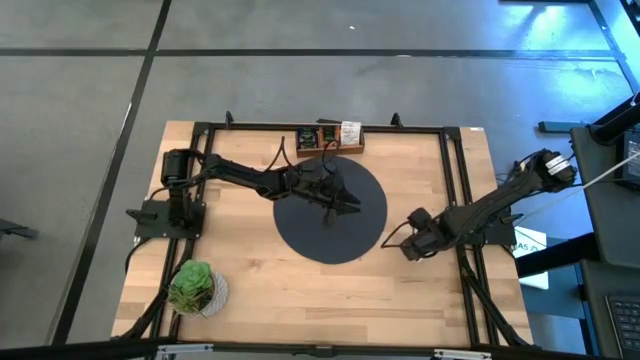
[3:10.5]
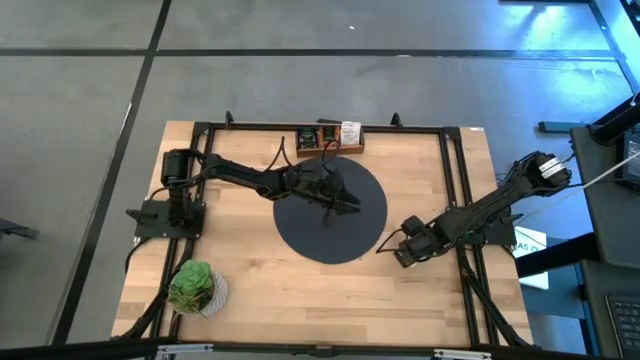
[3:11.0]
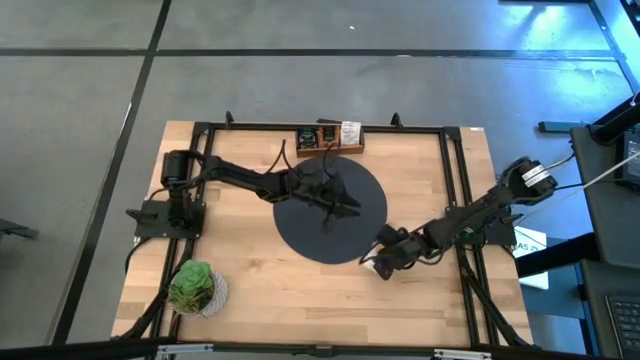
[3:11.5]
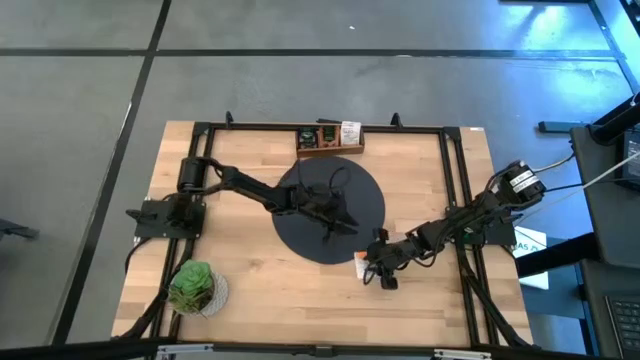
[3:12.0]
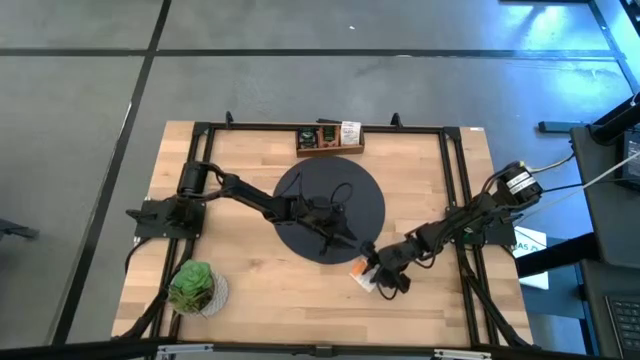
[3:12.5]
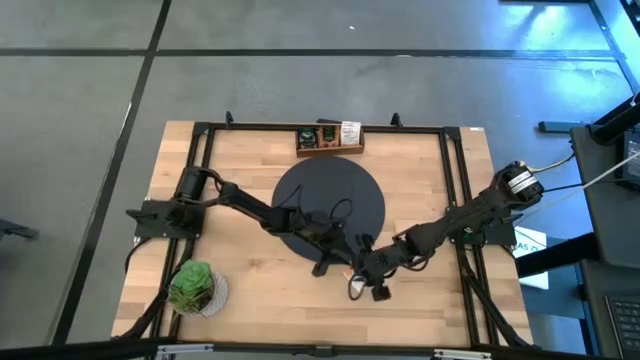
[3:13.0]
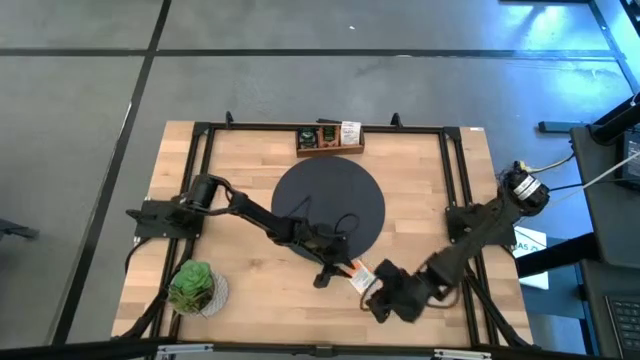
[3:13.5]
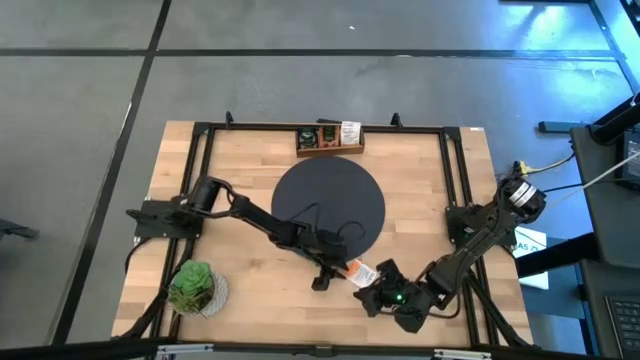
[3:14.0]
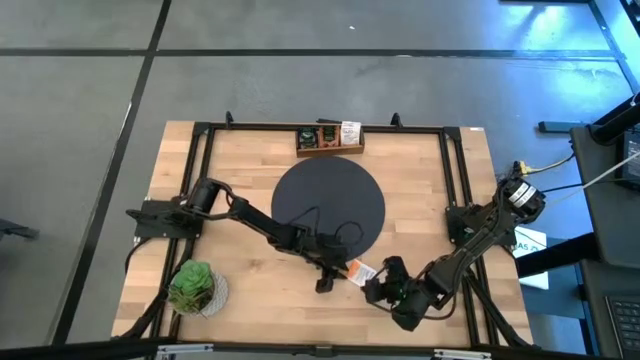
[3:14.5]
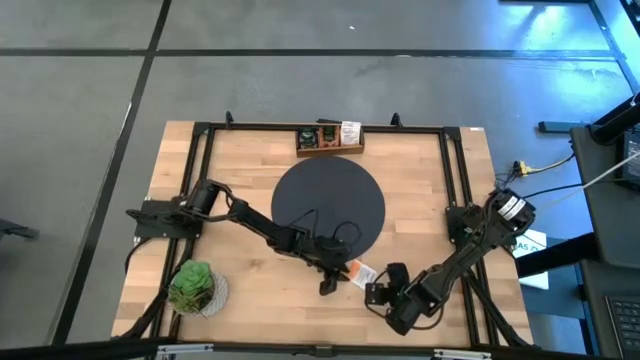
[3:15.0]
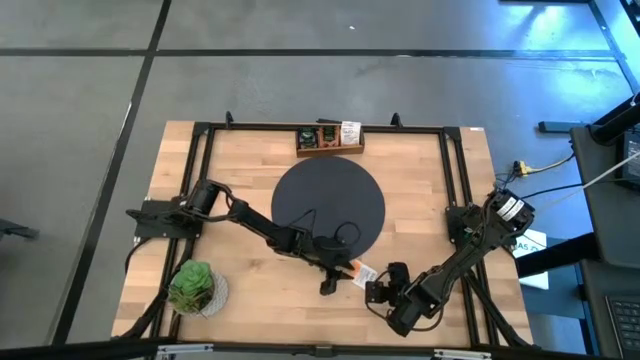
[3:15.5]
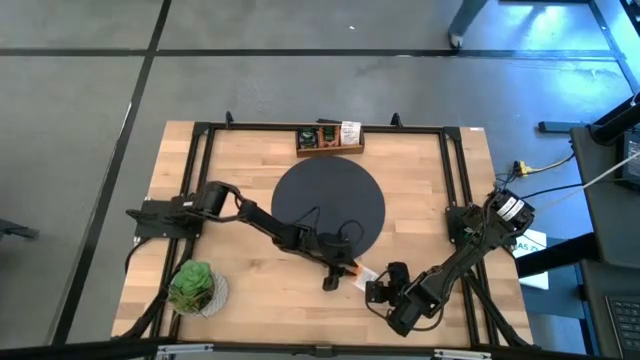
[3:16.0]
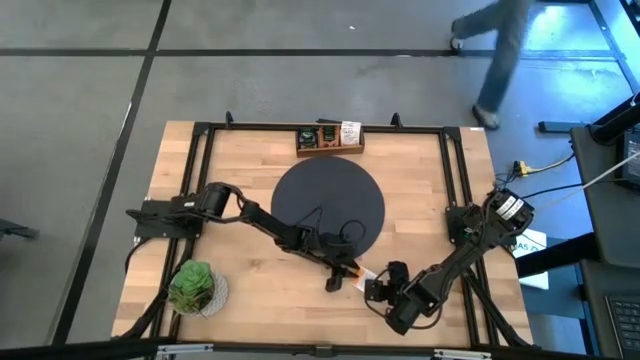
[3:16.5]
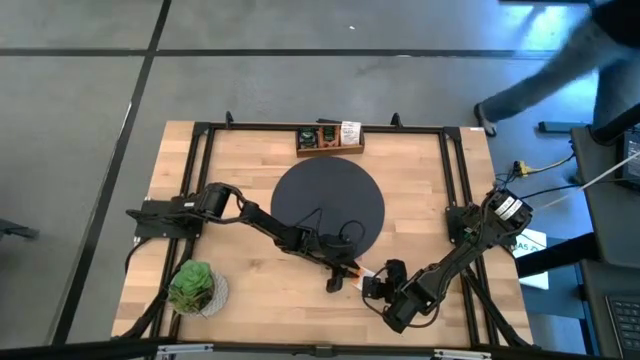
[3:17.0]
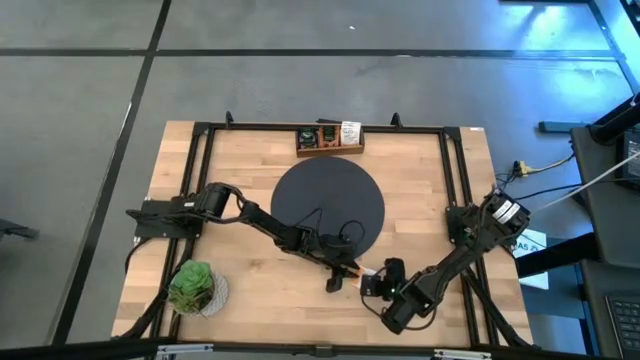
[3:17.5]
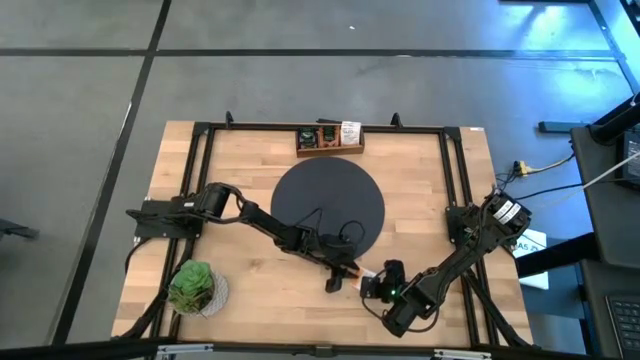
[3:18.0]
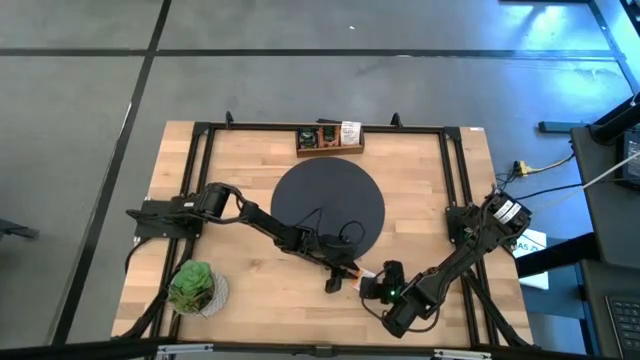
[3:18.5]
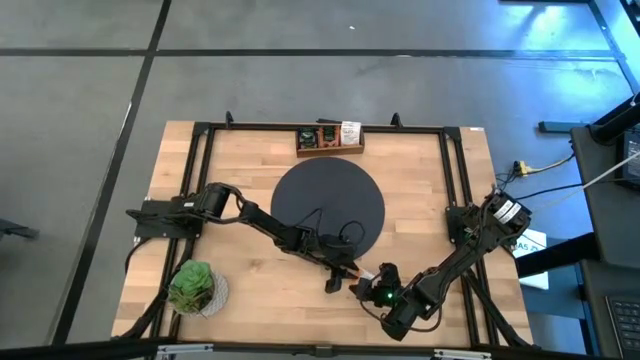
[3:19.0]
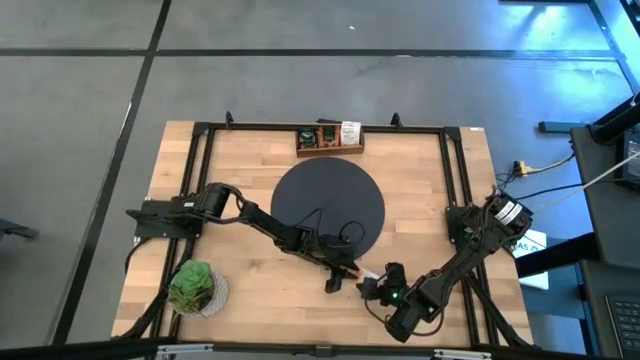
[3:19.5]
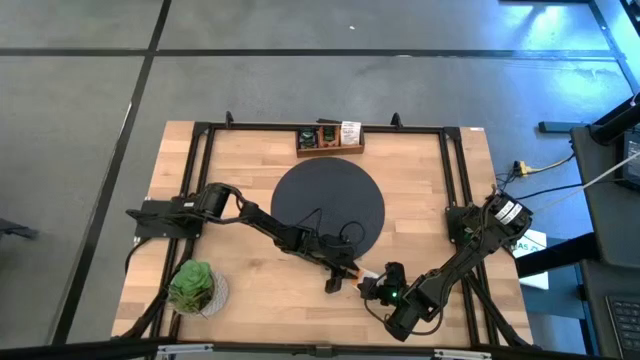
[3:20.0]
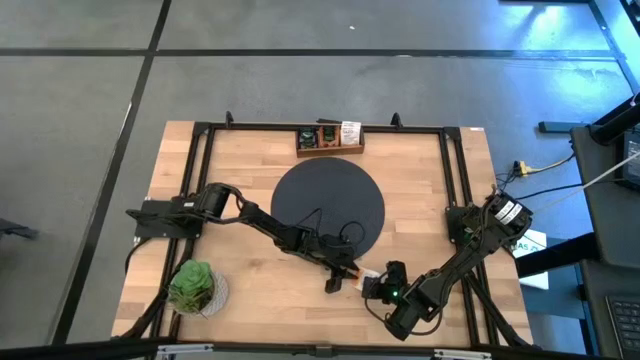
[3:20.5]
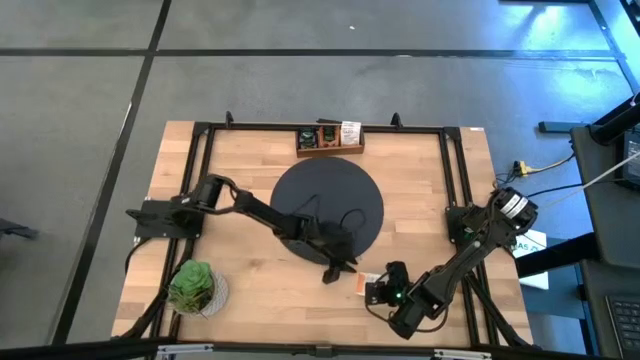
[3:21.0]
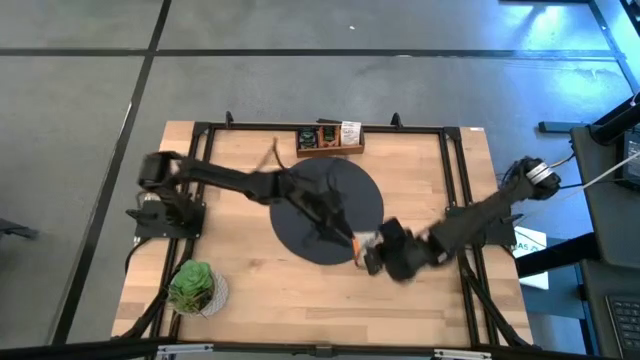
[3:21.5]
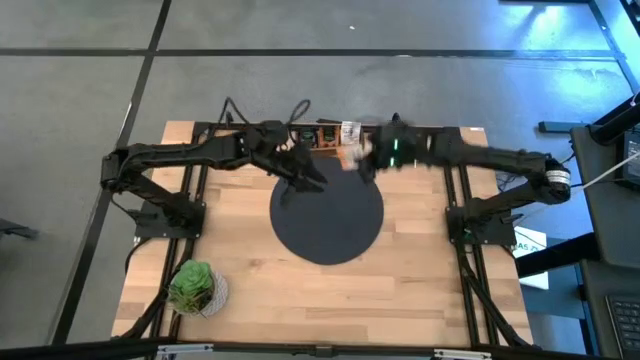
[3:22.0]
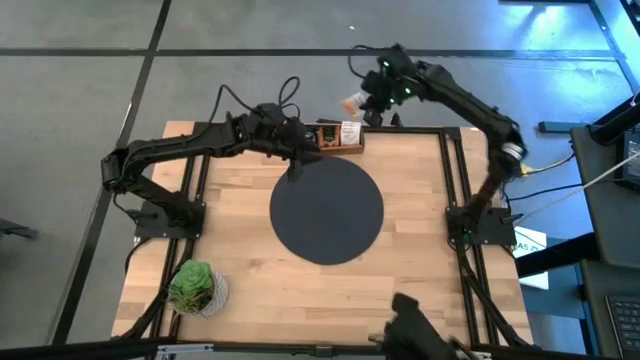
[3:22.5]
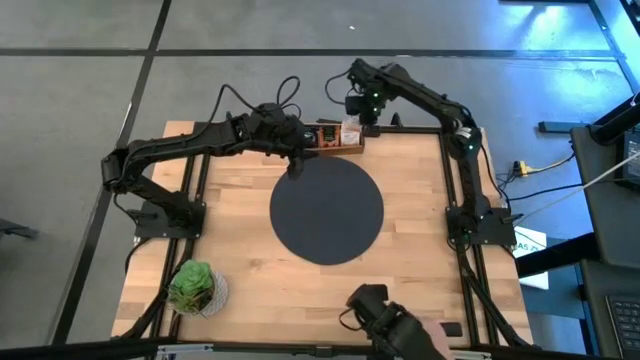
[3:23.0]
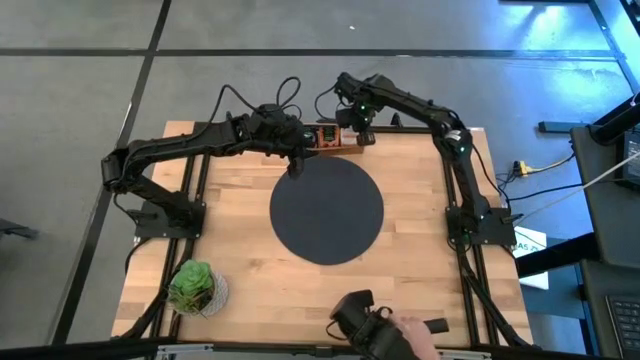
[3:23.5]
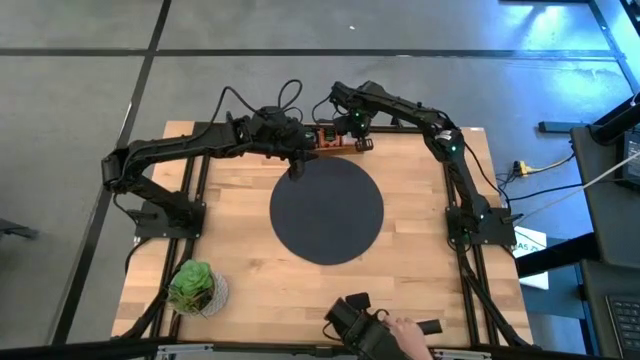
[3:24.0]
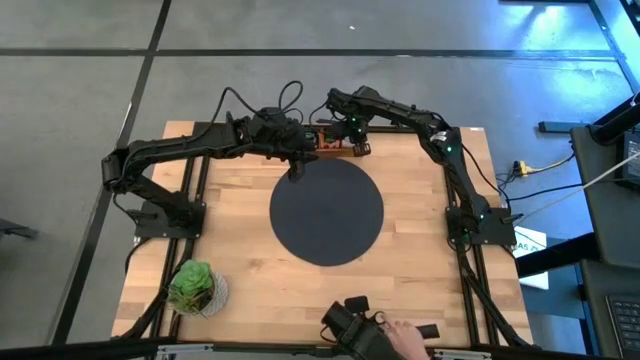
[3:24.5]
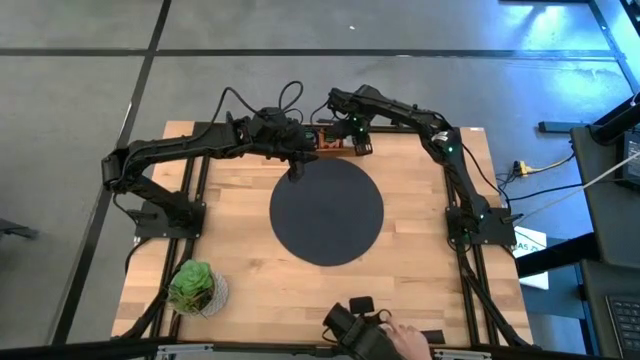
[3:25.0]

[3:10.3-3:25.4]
Task: Pick & Place Tea
Put the white tea bag into the right section of the wooden organizer

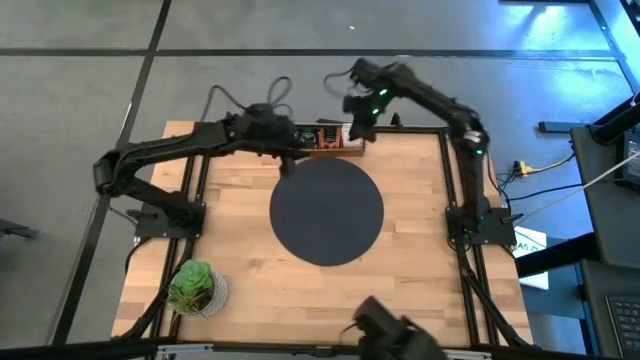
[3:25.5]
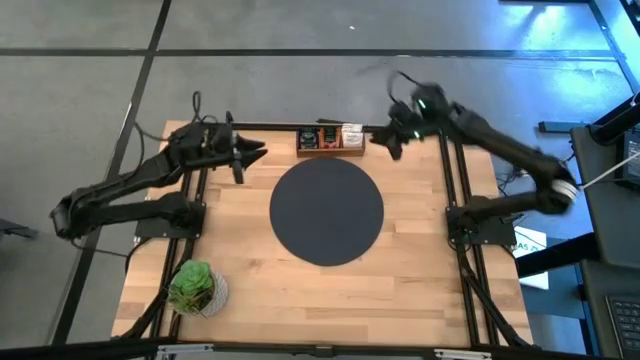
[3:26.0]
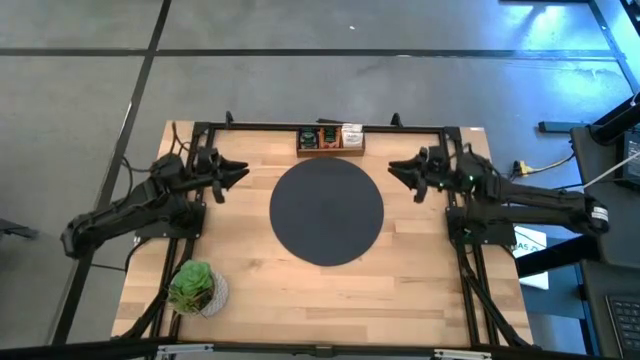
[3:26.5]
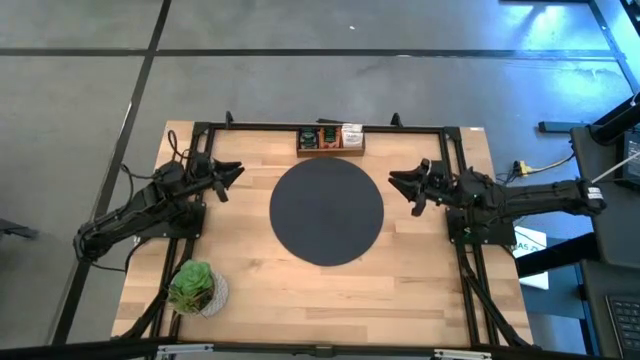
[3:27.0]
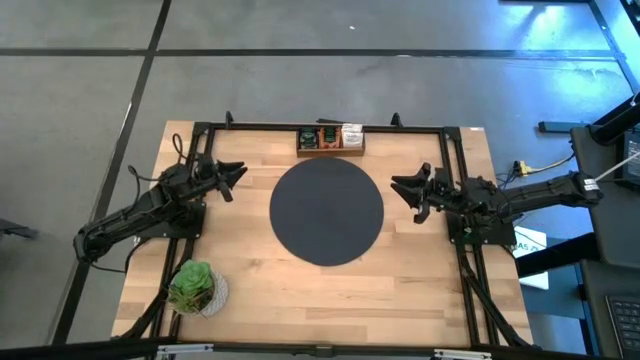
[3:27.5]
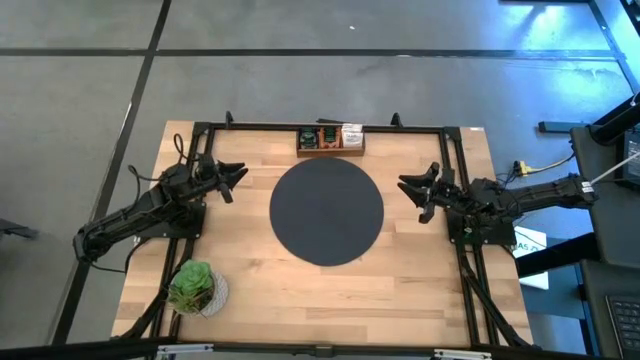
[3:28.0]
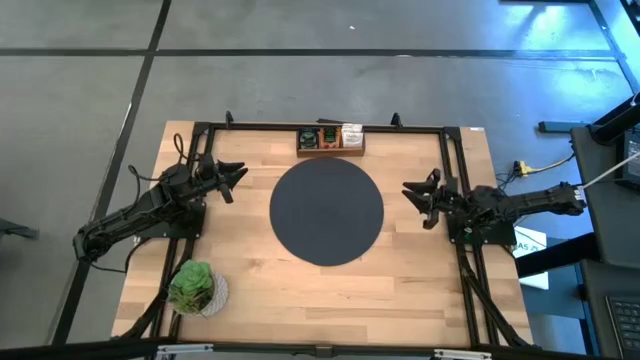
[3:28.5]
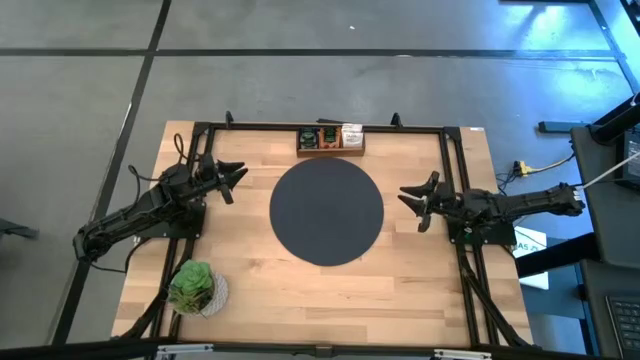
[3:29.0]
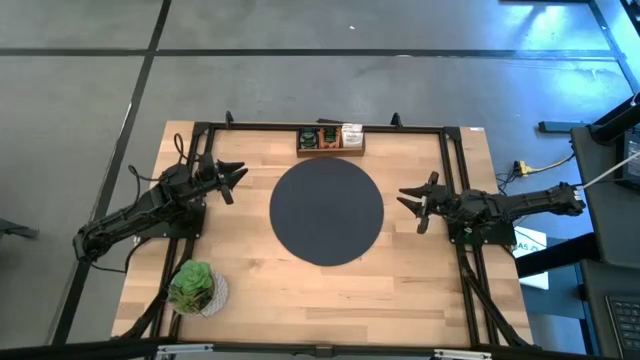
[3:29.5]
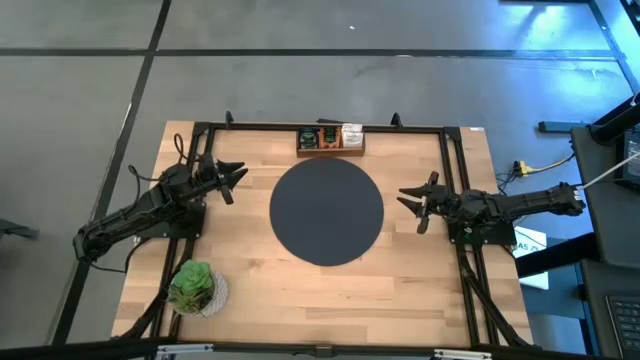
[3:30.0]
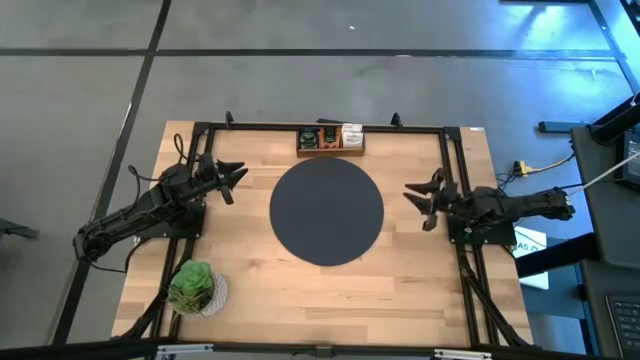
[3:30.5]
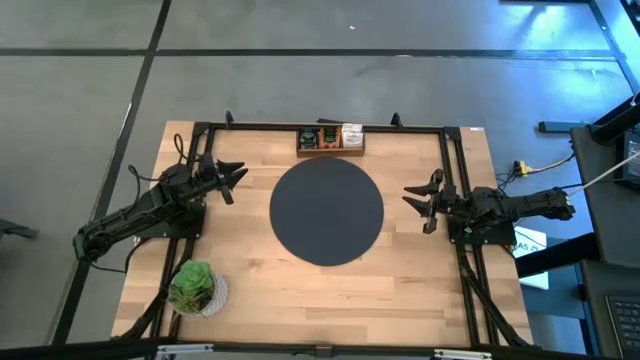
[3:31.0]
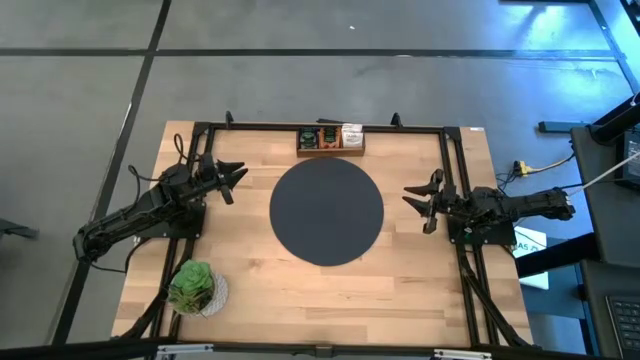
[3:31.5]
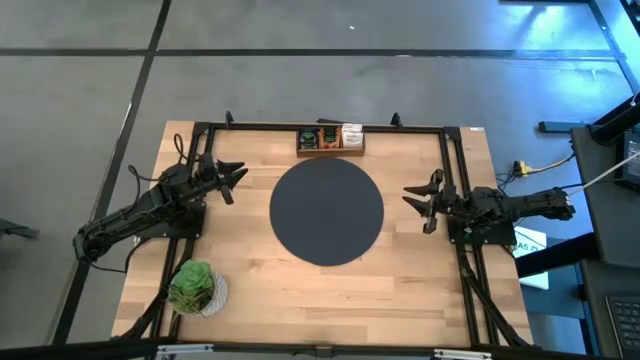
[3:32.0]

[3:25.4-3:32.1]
Return to Home Position
